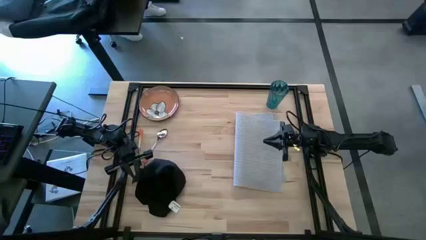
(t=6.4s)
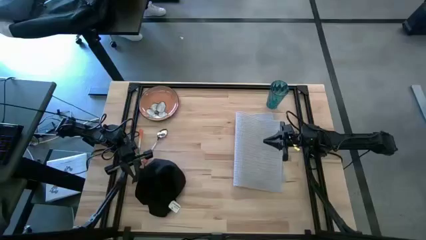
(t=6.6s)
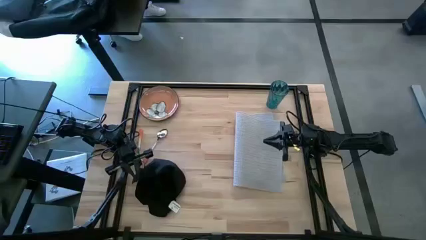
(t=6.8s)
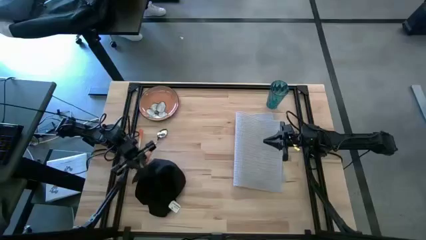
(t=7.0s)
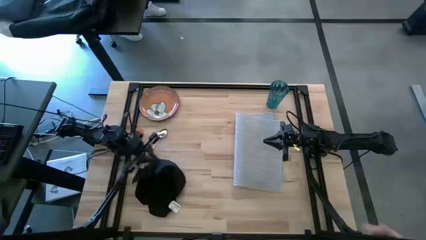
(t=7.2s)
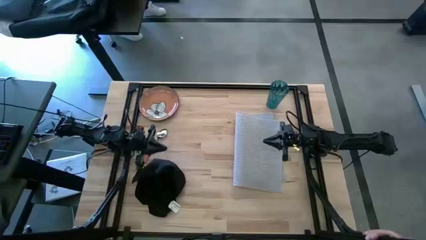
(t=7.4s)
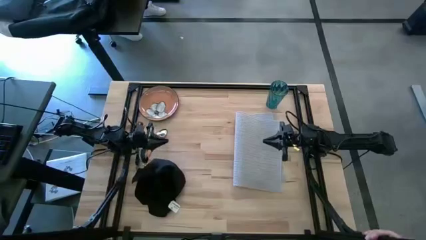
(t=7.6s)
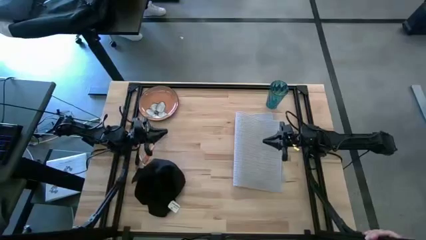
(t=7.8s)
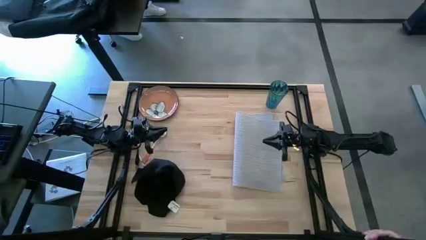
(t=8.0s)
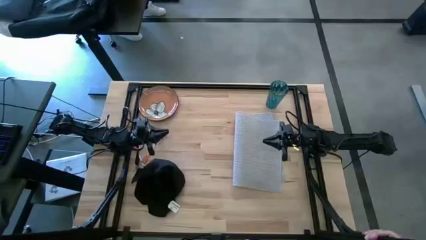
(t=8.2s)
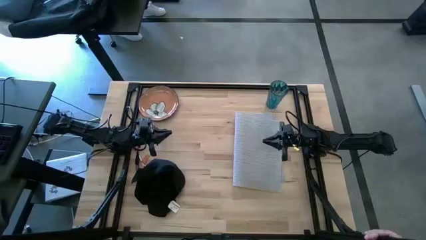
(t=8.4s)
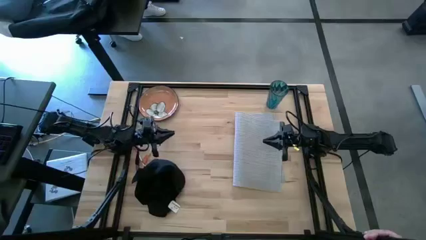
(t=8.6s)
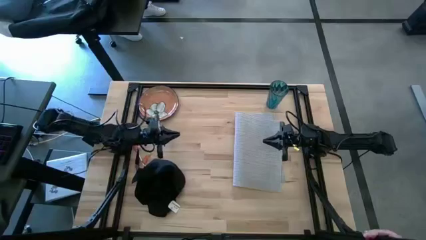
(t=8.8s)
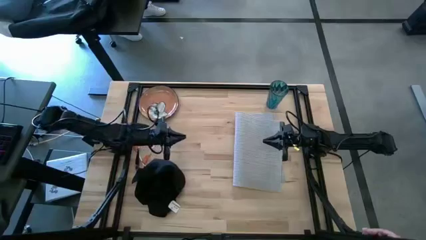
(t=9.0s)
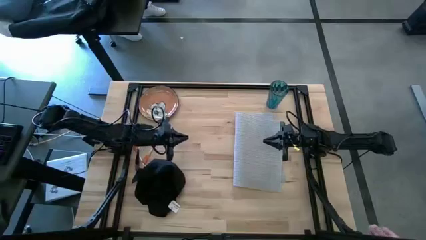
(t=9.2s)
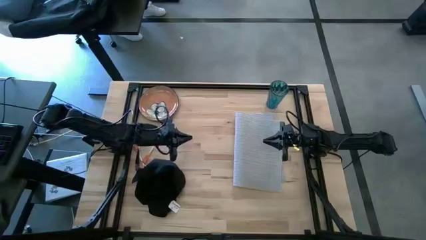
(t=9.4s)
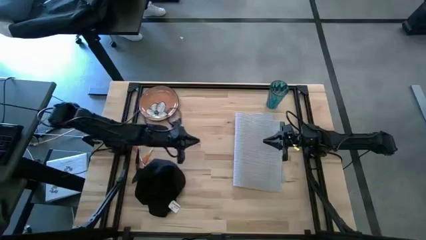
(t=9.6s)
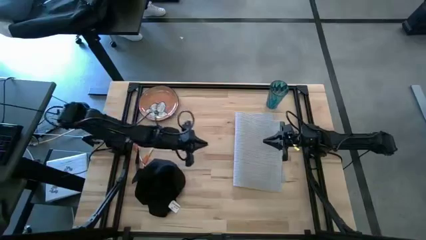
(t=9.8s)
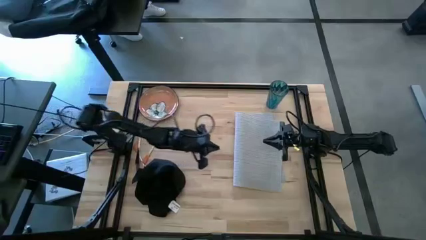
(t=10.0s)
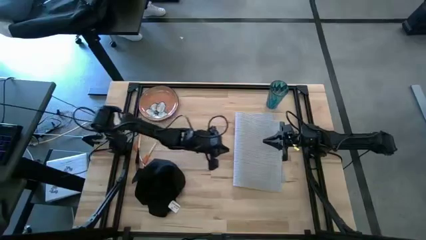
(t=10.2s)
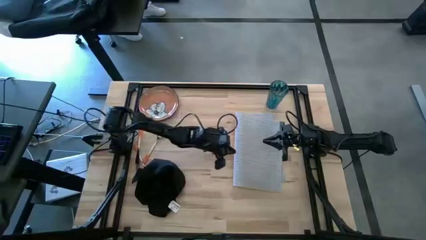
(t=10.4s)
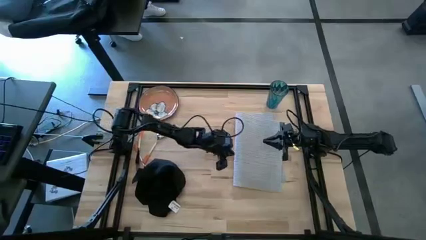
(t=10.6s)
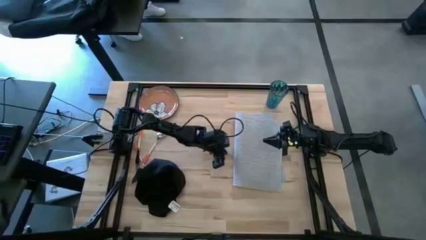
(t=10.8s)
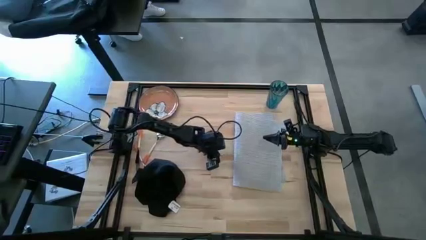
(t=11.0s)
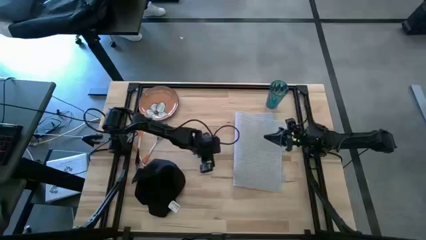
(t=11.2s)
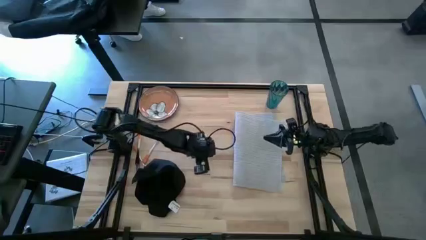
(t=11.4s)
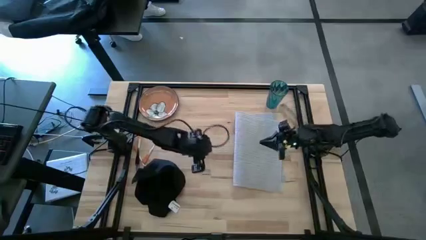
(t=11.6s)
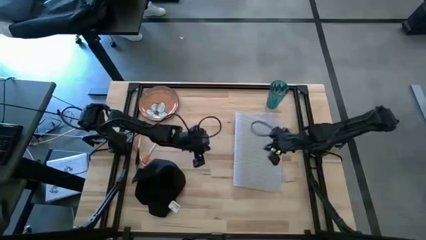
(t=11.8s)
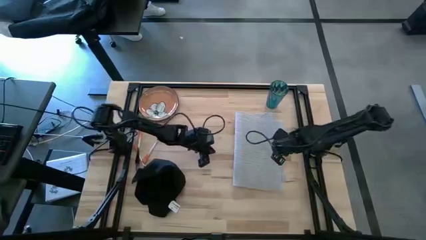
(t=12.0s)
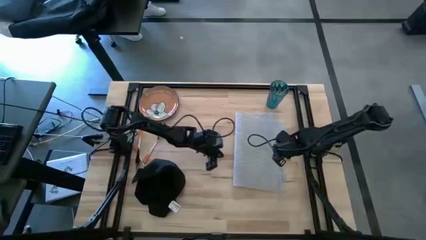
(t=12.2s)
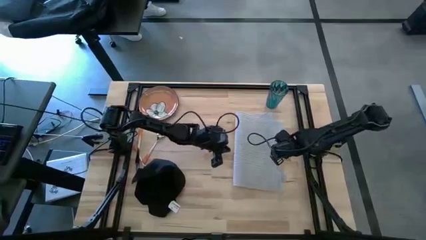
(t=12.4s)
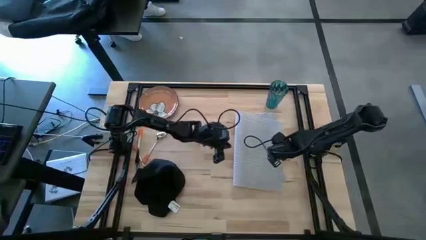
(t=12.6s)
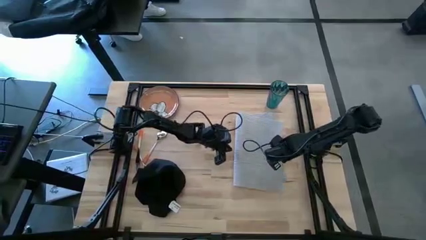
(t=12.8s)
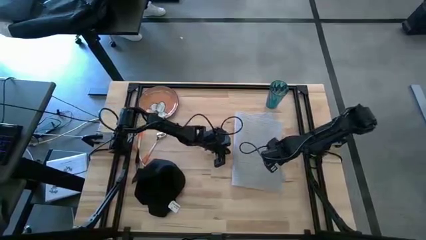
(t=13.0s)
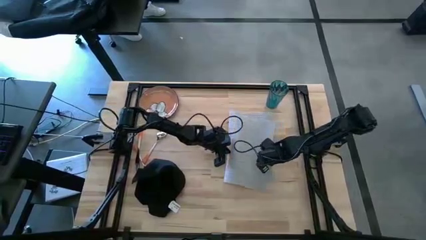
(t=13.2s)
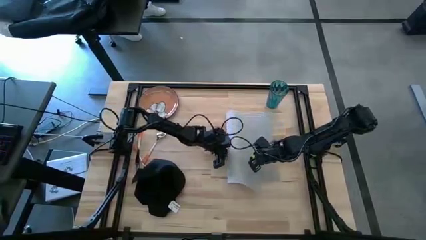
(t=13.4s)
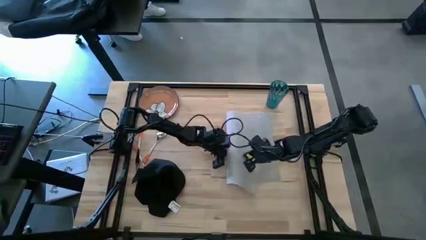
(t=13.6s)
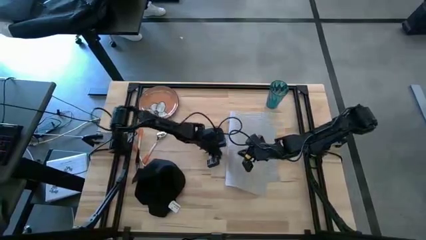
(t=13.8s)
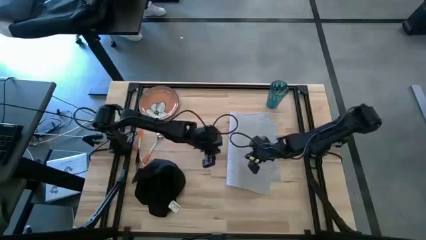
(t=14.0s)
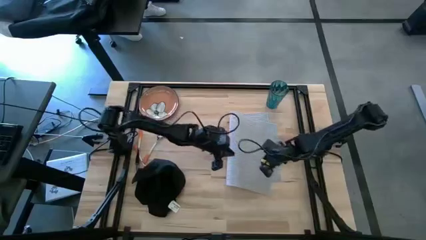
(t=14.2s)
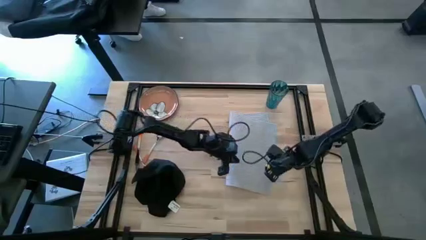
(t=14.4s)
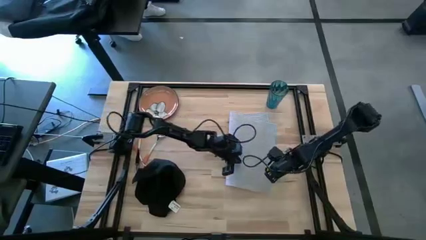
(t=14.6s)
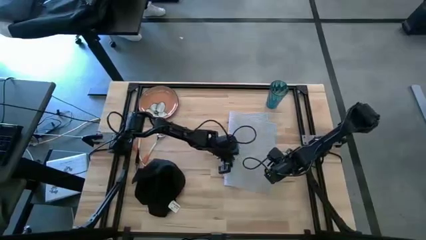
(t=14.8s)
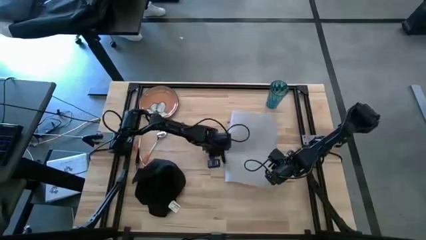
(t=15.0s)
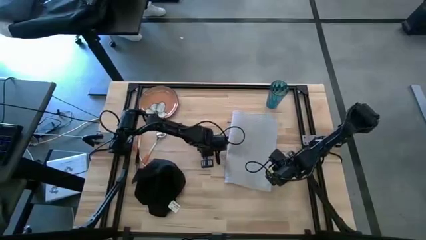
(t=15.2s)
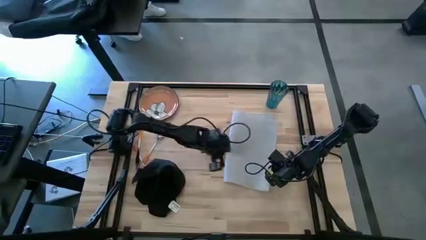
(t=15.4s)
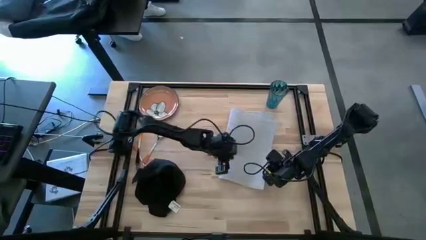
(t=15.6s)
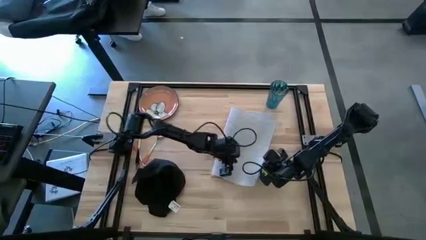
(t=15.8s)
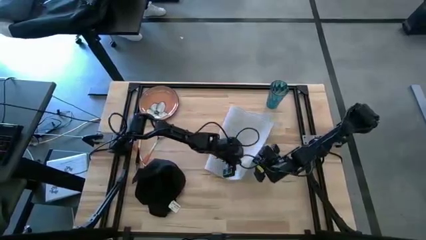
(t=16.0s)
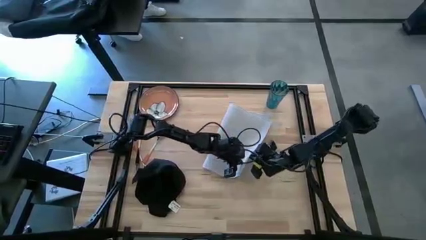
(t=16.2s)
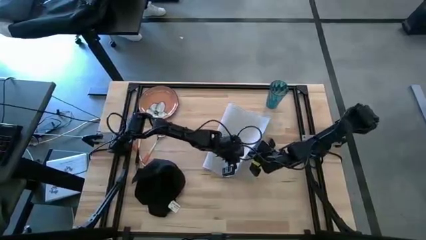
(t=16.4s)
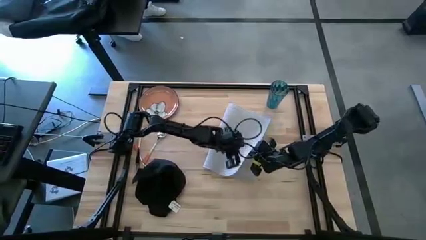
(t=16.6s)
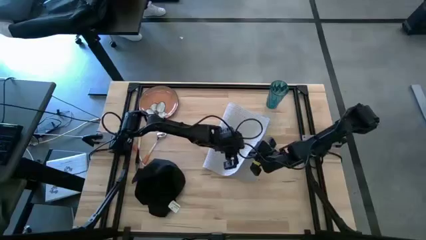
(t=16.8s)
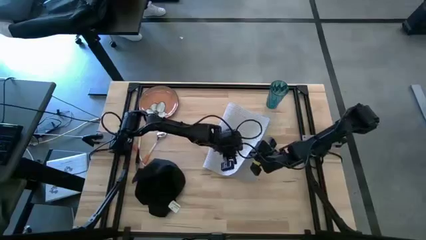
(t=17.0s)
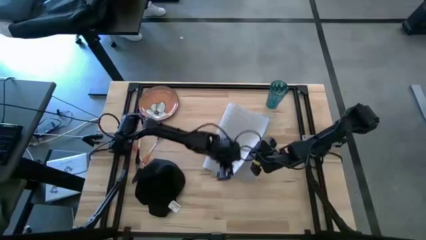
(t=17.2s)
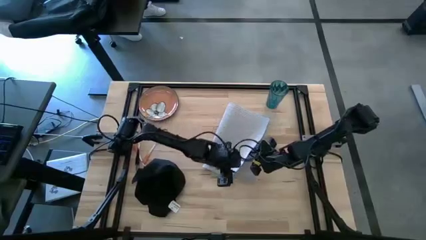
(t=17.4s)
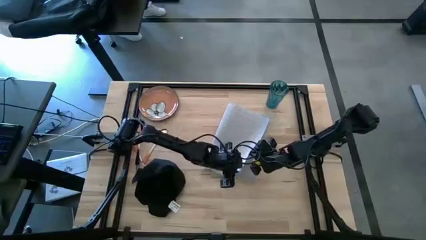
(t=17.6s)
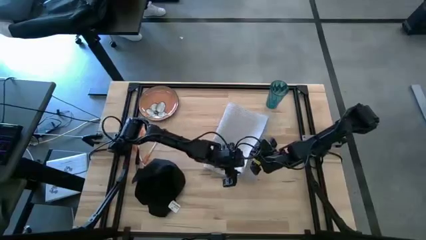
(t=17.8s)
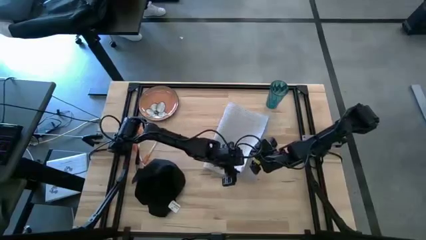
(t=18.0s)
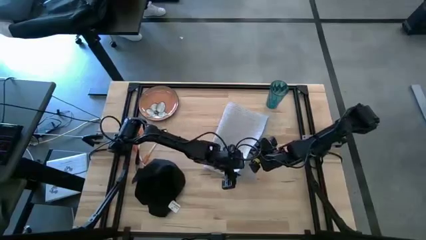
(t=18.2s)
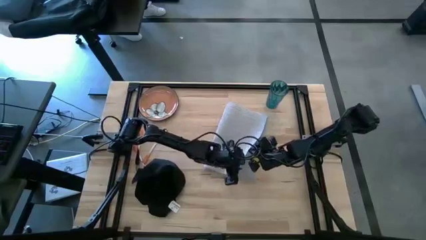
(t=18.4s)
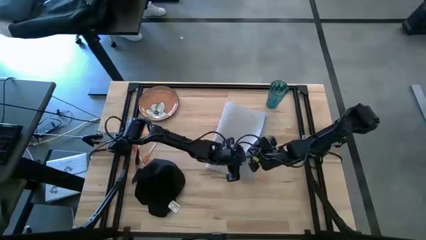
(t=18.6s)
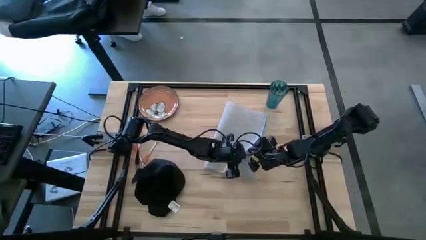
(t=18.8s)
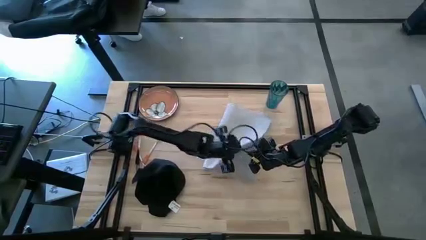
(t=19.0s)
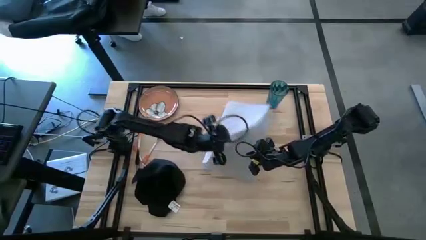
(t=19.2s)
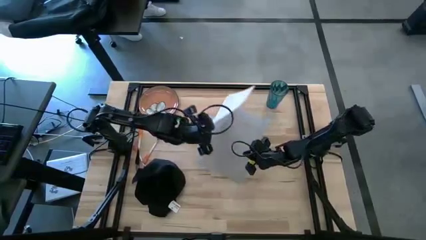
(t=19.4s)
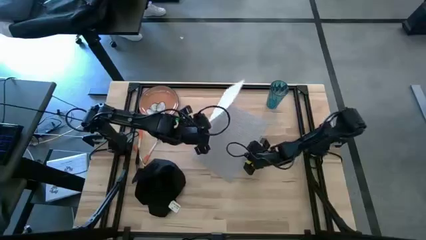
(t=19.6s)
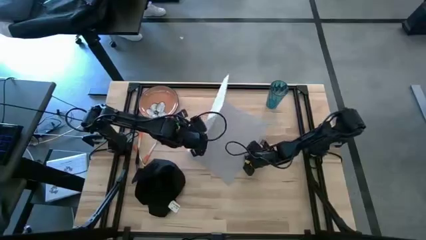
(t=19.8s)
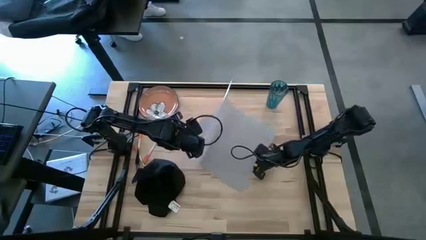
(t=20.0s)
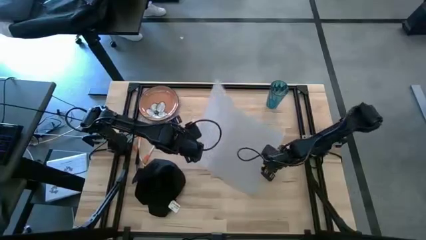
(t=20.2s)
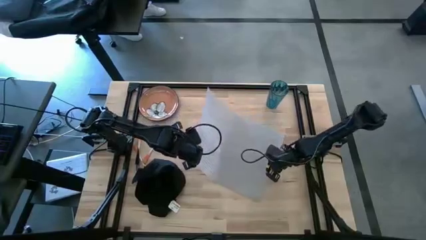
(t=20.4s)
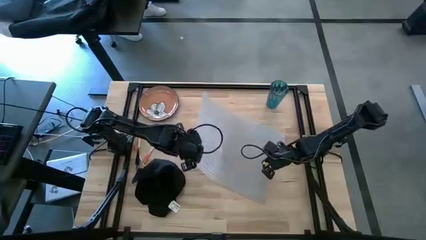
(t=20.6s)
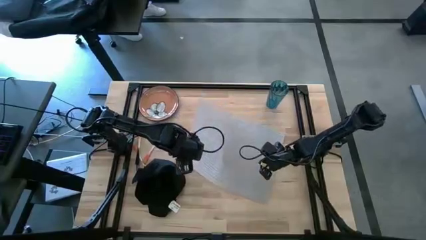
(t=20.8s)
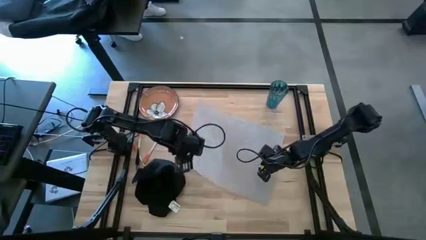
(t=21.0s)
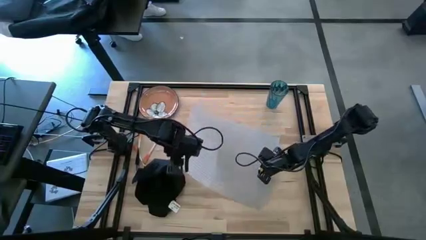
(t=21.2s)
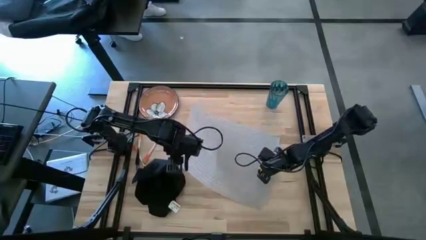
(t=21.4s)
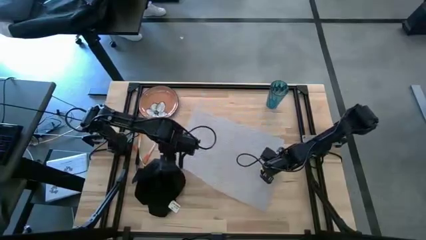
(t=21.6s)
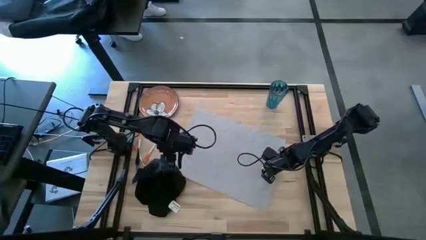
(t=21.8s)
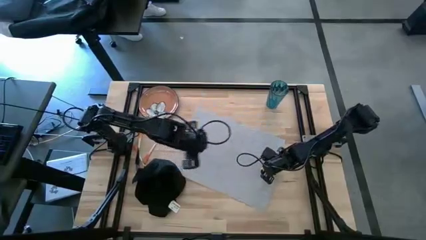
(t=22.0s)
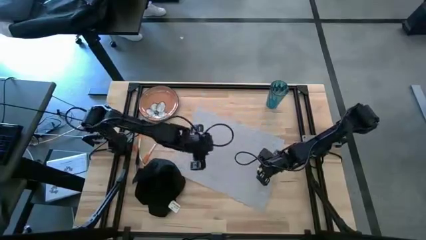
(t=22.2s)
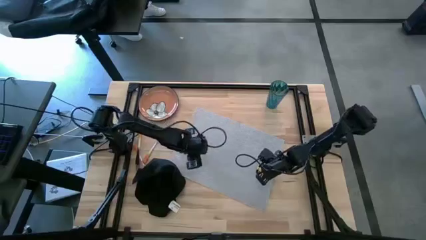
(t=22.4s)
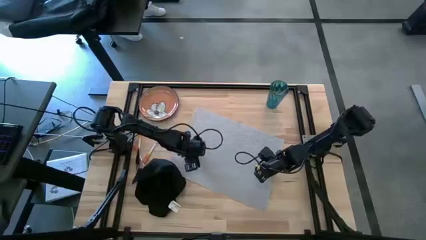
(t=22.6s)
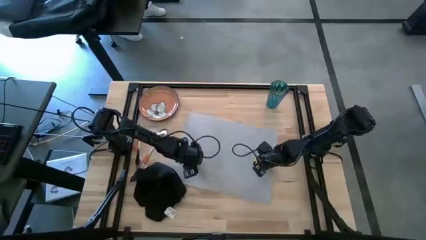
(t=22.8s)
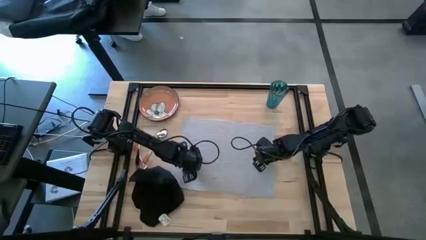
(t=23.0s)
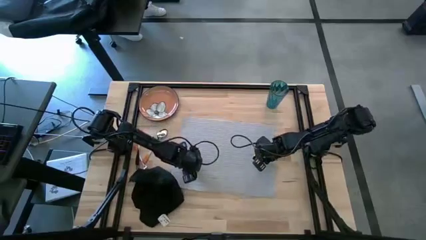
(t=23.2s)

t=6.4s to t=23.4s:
Task: Set table place
Prepare the gray table mat
